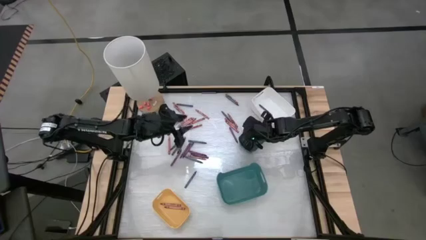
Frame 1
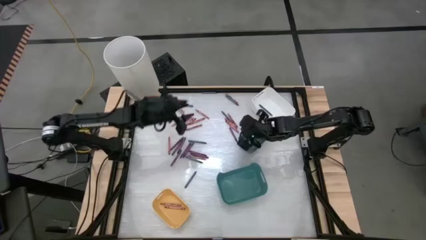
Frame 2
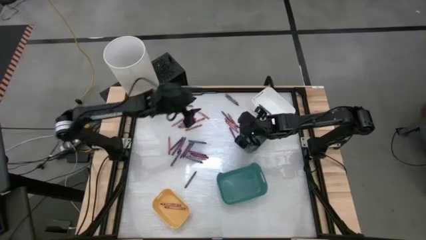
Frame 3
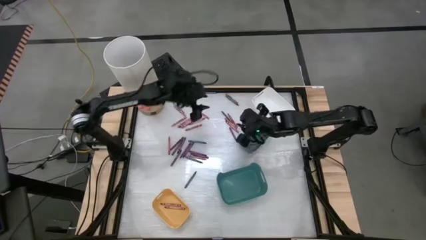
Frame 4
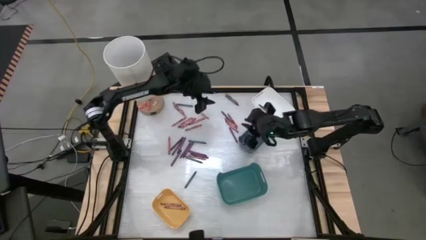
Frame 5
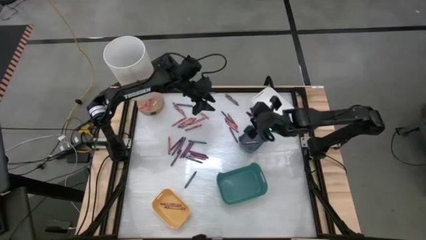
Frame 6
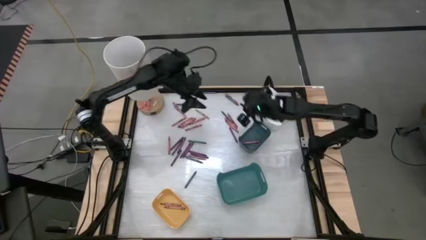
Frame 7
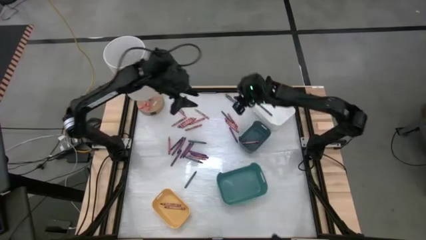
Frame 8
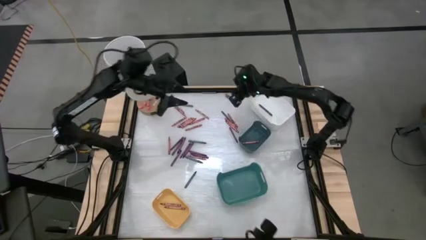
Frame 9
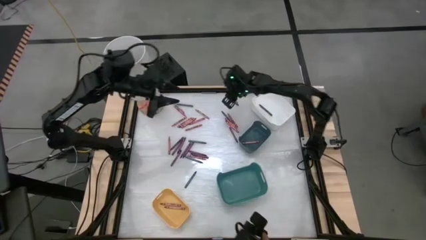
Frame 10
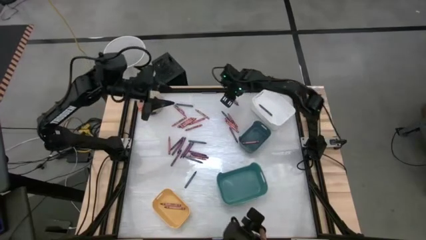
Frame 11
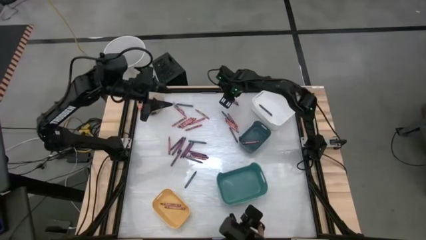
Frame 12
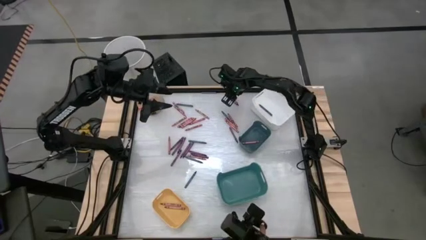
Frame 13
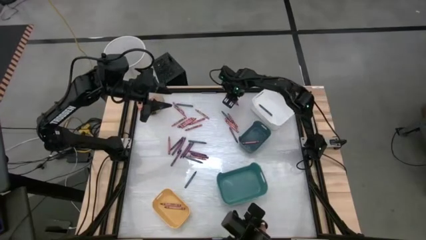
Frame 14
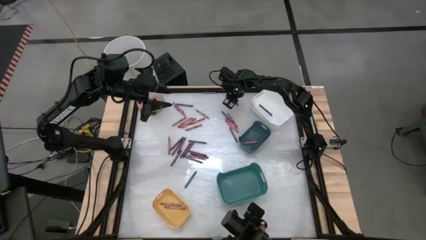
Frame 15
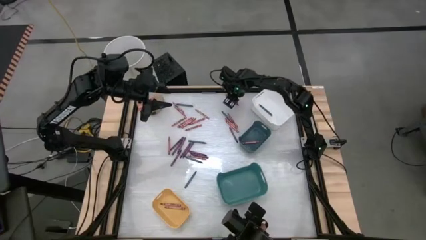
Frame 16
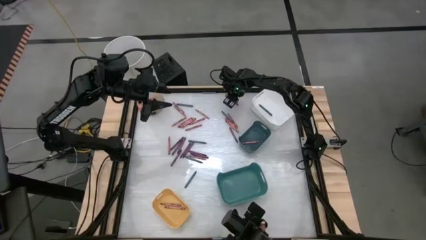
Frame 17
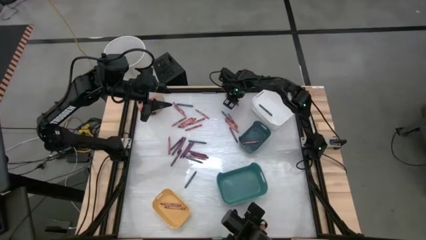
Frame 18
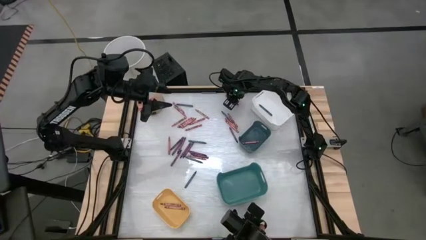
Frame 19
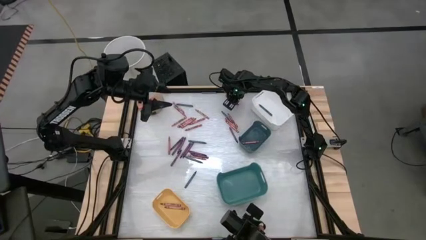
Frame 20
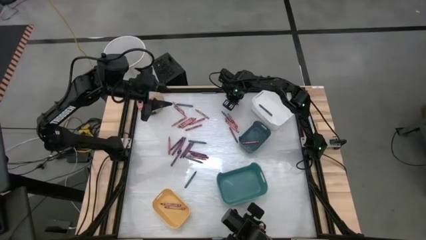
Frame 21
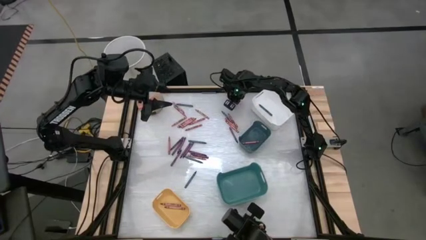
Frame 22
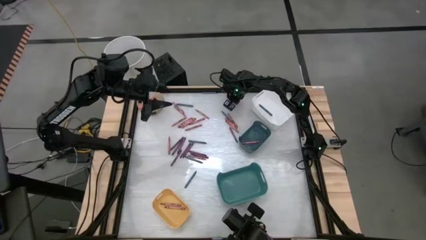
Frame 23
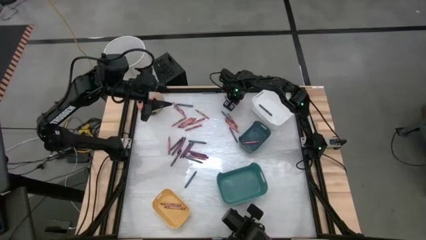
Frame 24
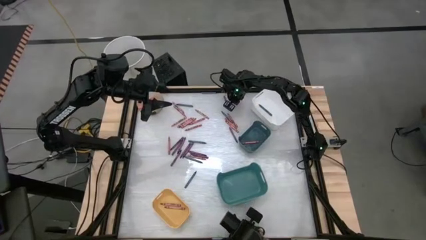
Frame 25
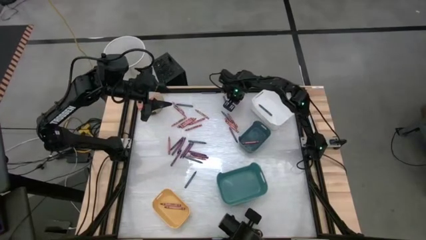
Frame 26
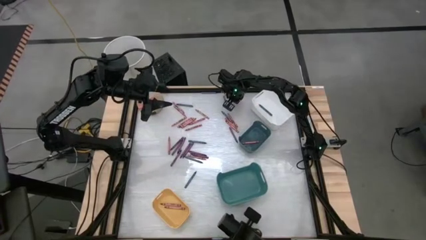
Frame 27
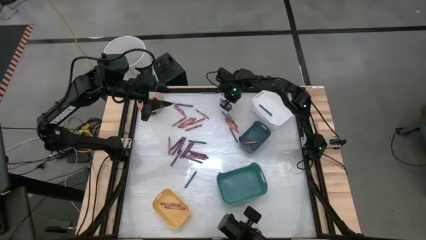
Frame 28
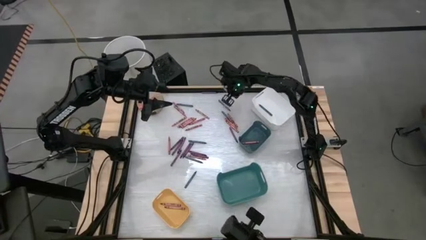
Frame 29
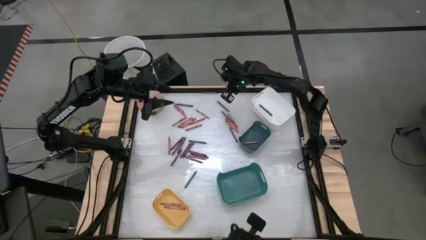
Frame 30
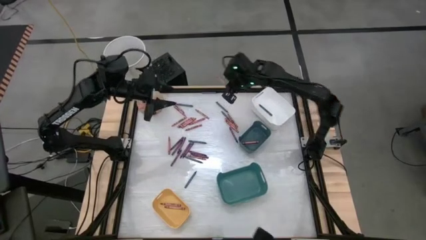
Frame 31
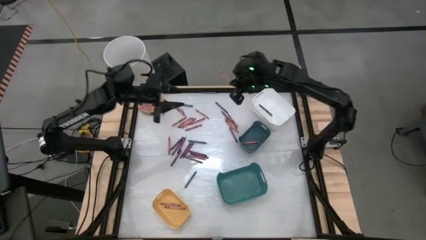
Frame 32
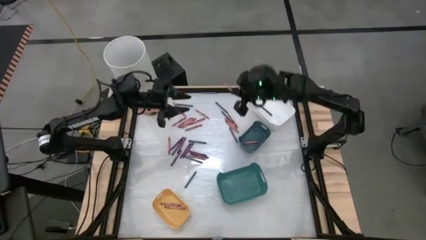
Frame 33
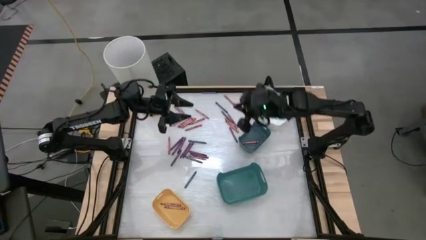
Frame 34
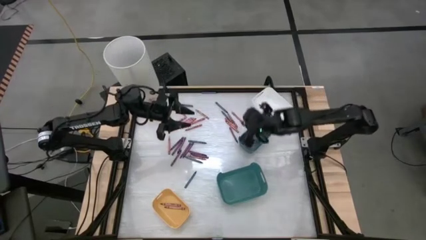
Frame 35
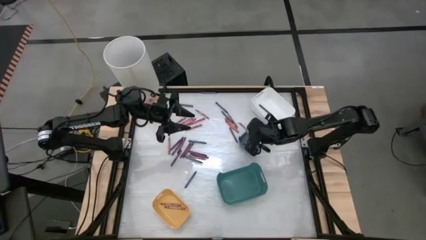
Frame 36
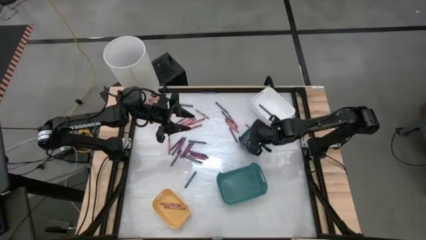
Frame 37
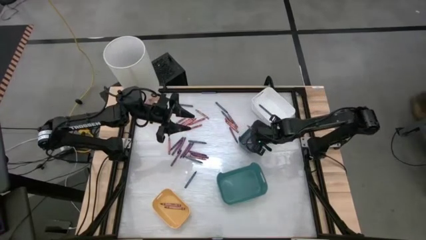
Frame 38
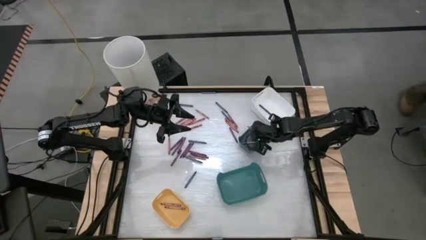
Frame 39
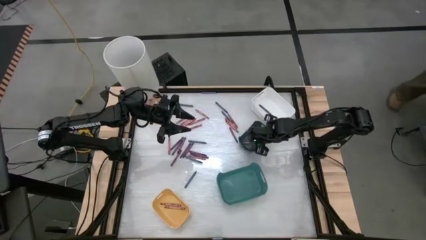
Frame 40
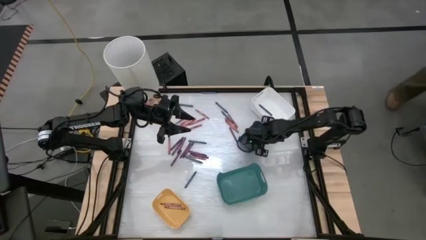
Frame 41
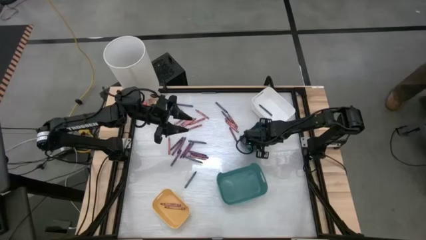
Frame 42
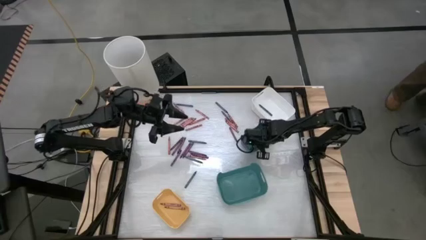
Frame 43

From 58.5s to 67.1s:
Task: Sort crayons
Put the pink crayon into the dark blue bin

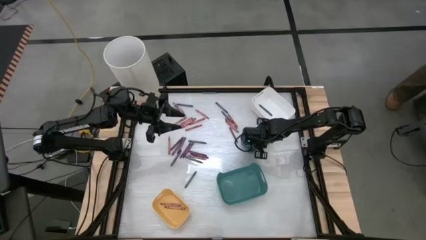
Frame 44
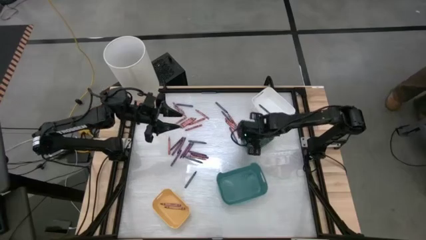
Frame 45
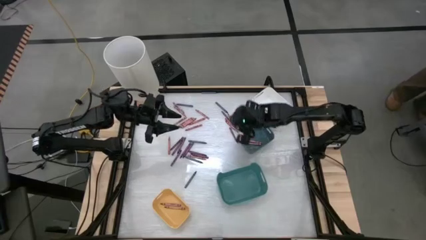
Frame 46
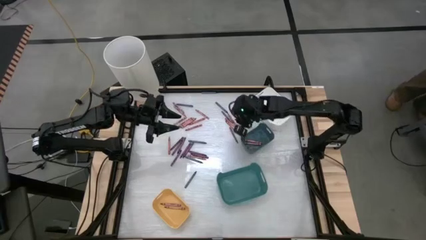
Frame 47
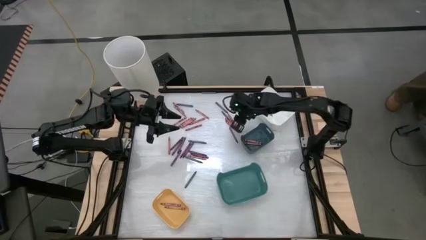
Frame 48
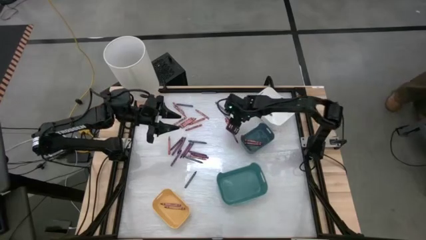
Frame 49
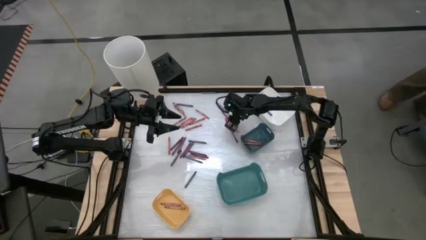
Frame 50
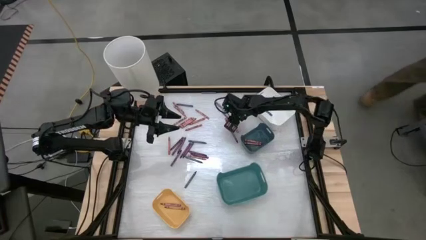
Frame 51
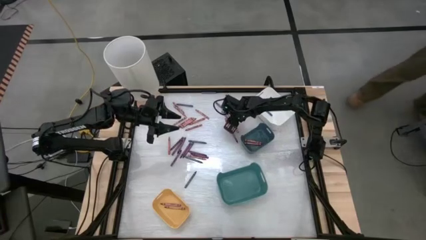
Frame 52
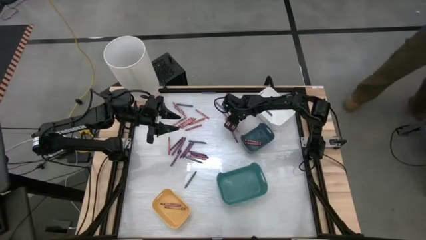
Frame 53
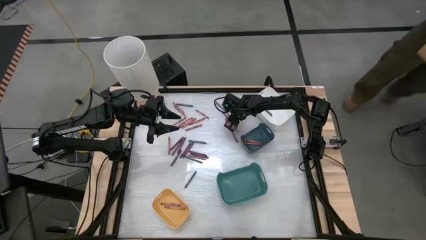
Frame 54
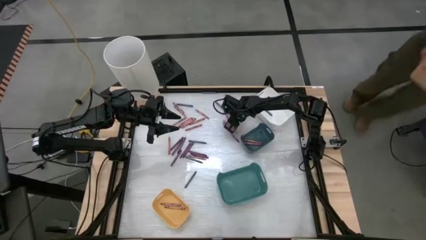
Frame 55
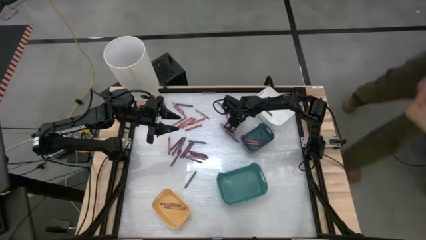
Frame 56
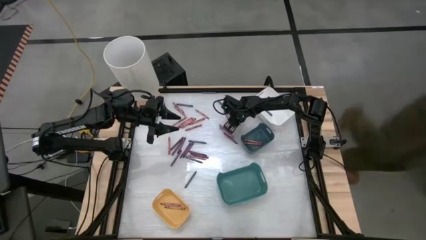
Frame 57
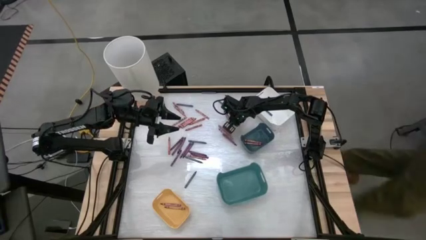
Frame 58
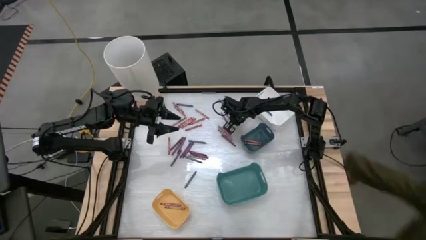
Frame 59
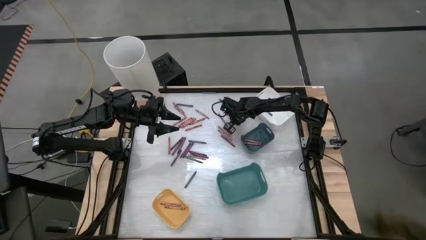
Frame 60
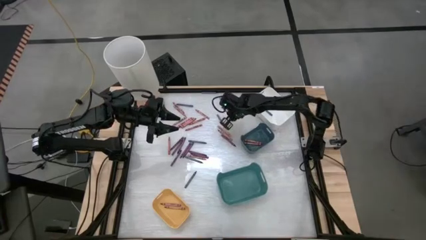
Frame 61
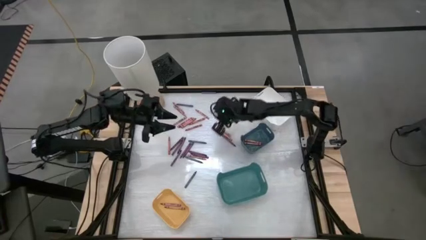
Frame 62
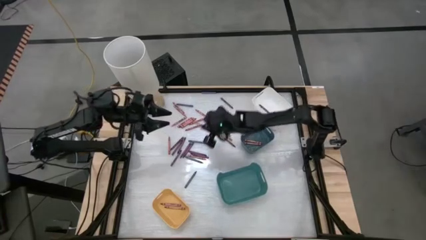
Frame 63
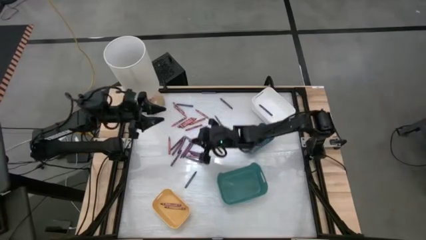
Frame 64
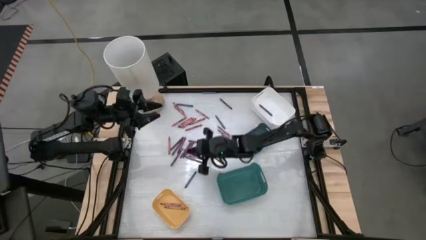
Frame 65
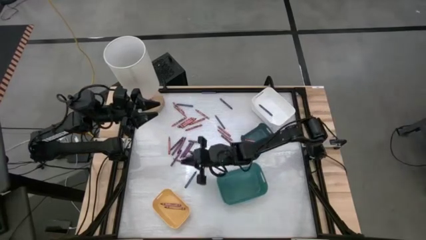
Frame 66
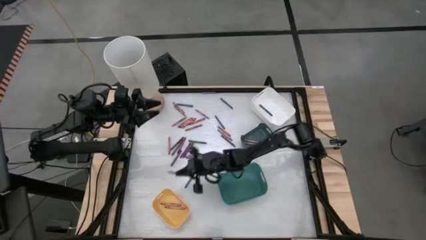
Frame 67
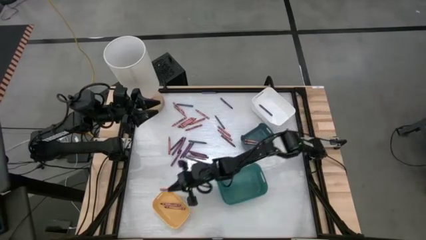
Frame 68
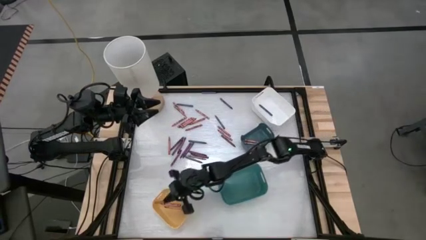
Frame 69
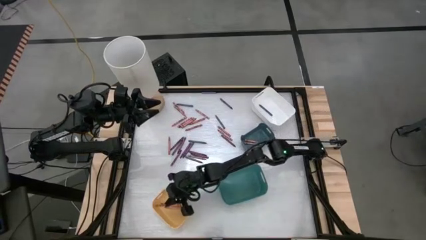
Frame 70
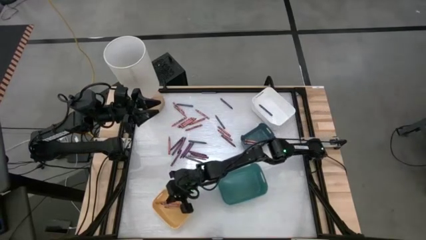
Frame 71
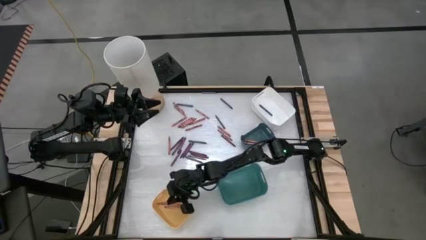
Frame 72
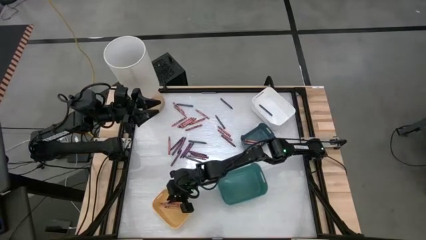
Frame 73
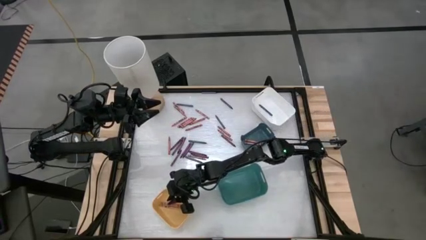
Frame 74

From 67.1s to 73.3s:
Put the red crayon into the yellow bin

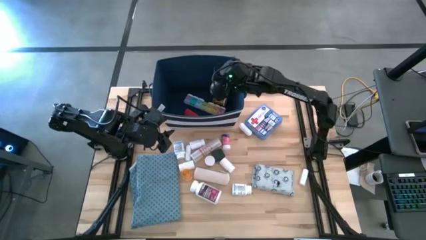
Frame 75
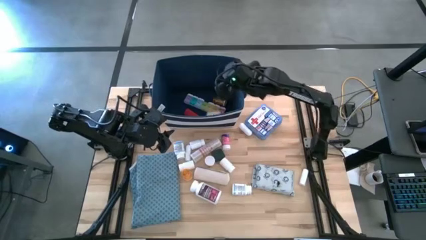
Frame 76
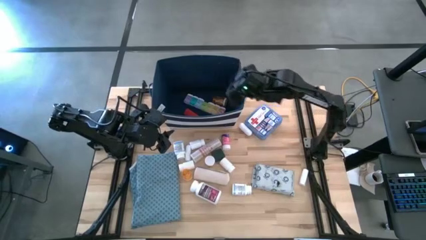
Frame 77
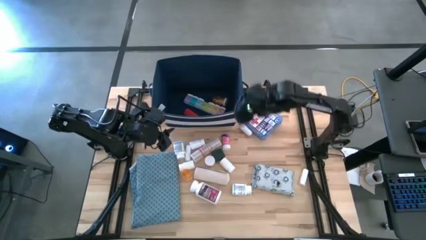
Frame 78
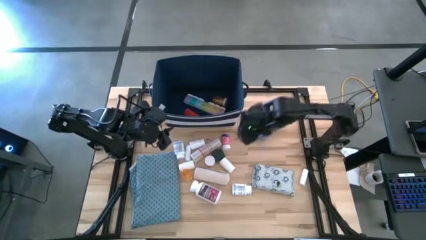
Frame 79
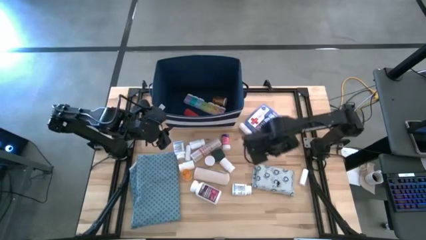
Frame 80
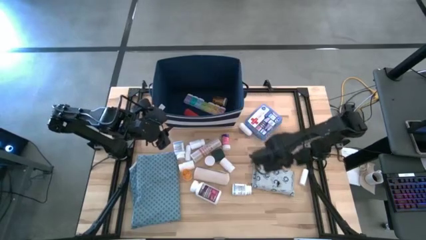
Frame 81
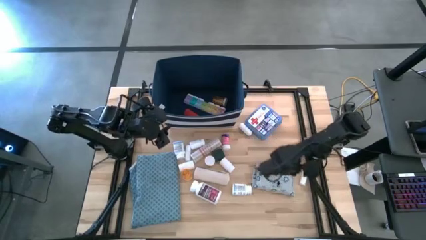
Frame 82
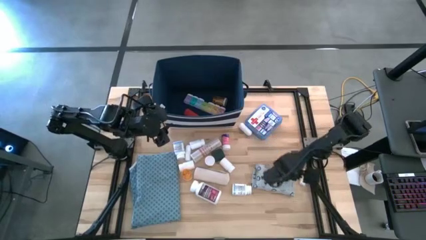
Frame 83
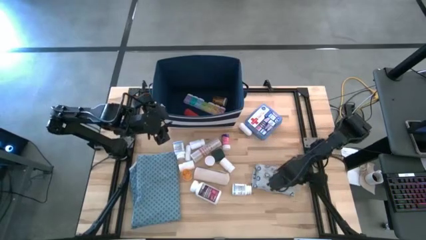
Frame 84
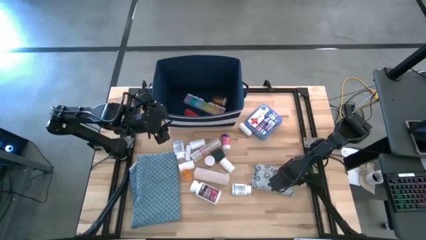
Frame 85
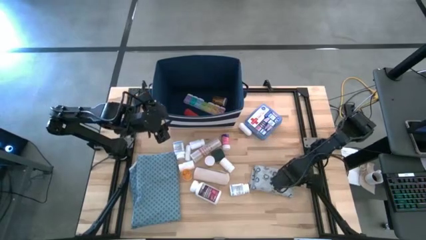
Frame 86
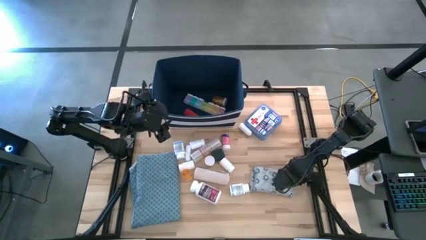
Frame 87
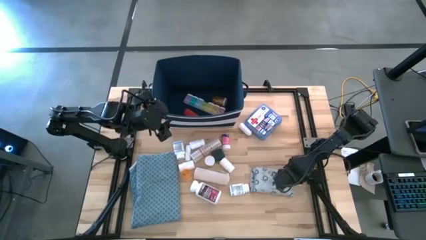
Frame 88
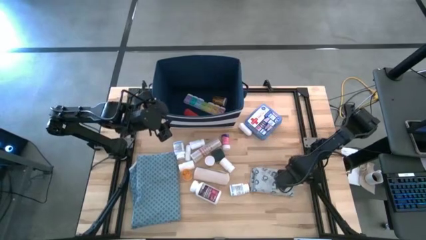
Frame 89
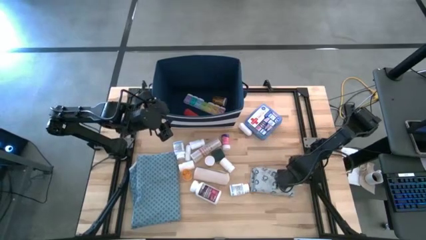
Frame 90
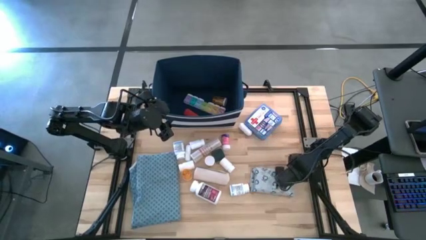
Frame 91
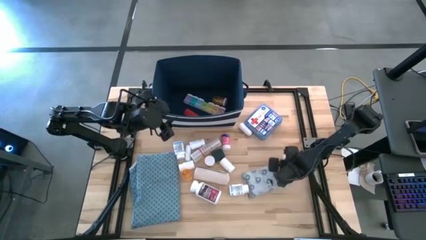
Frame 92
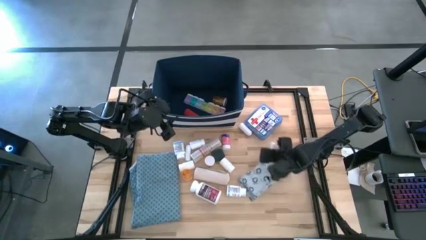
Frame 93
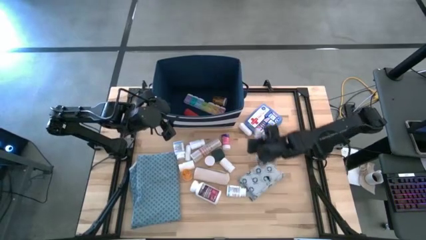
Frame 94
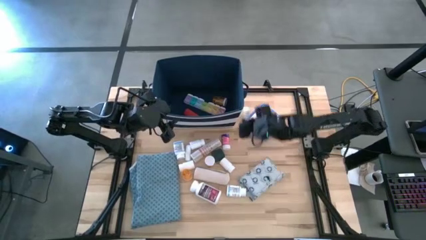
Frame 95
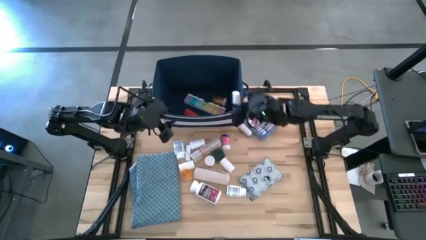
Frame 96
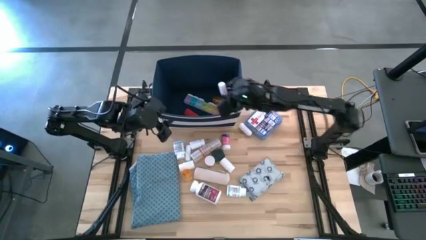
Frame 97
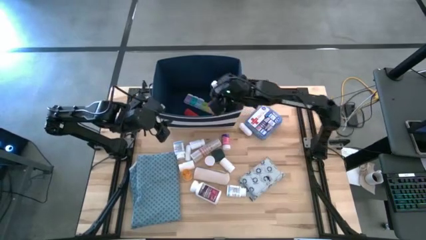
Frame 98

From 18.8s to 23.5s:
Task: Pick & place medical supplies in basket/bin
Put the white rolled gauze into the blue bin
